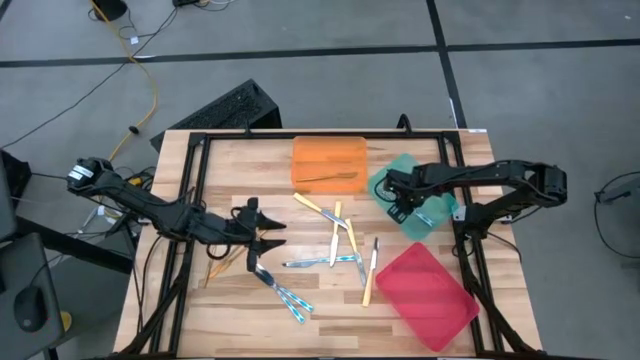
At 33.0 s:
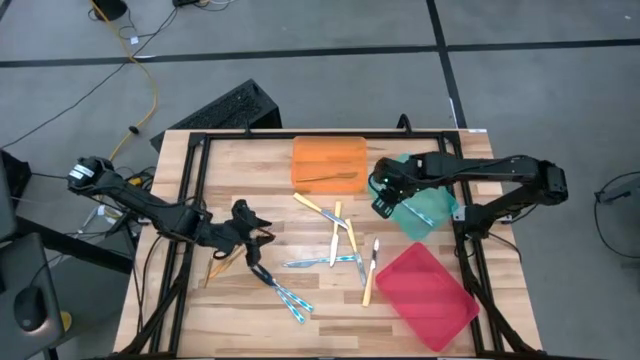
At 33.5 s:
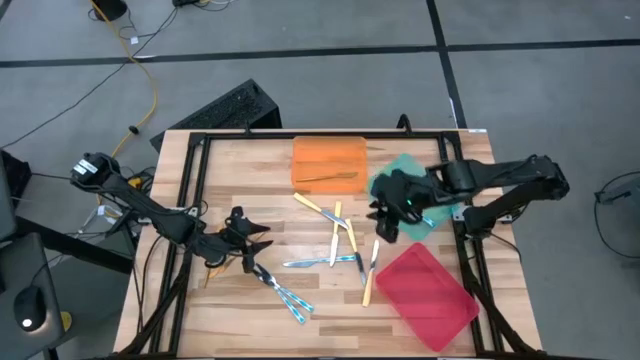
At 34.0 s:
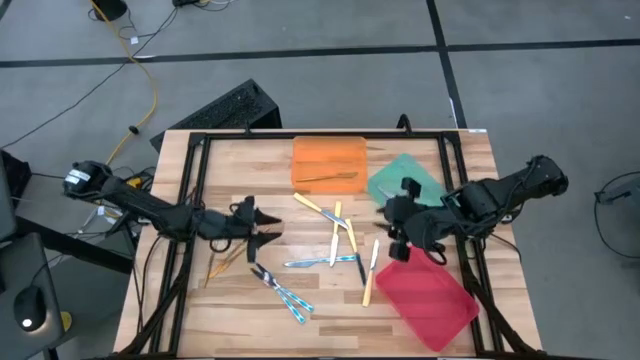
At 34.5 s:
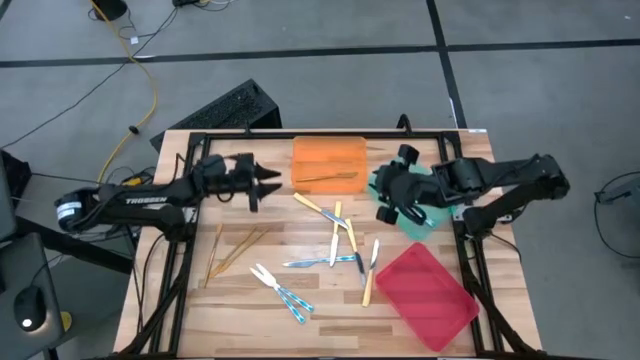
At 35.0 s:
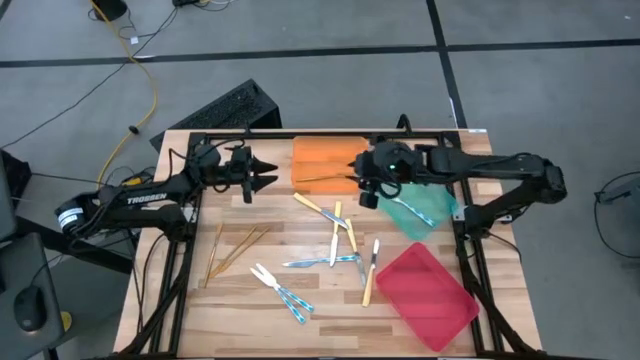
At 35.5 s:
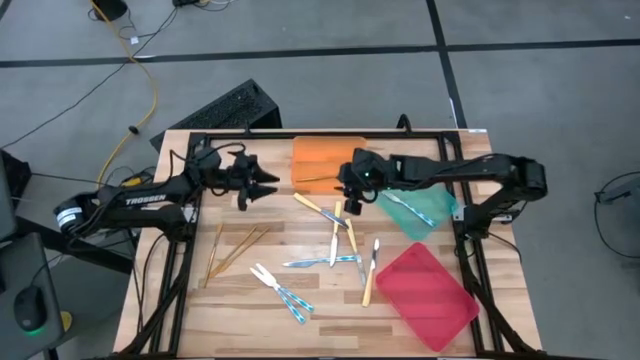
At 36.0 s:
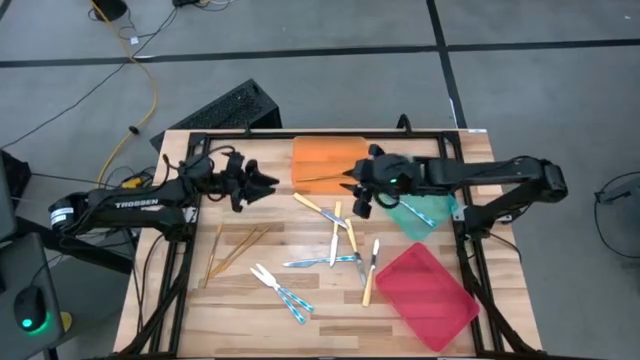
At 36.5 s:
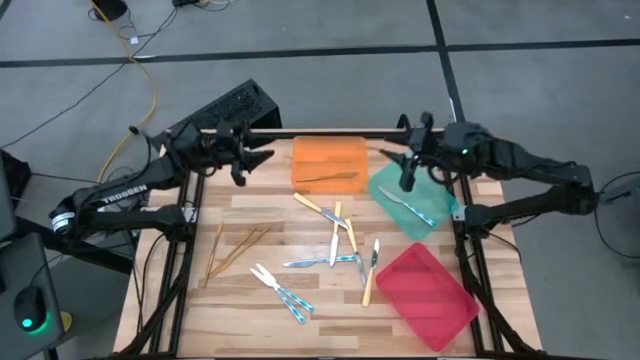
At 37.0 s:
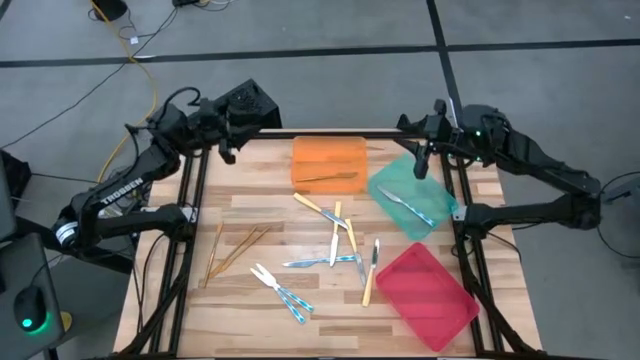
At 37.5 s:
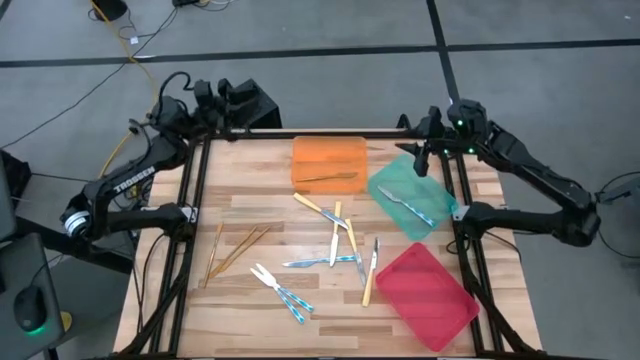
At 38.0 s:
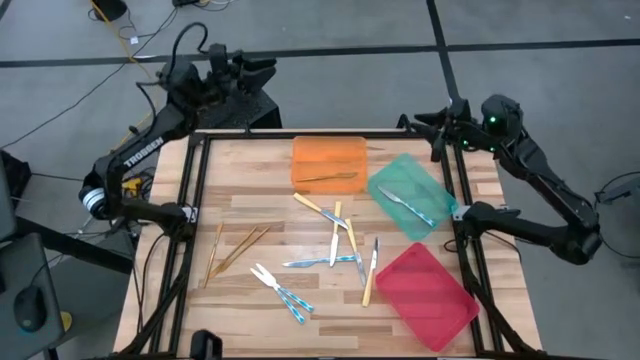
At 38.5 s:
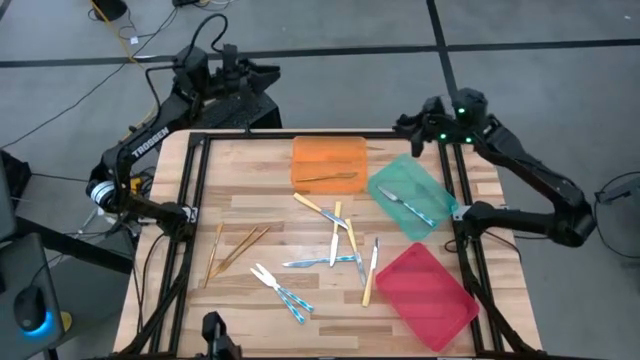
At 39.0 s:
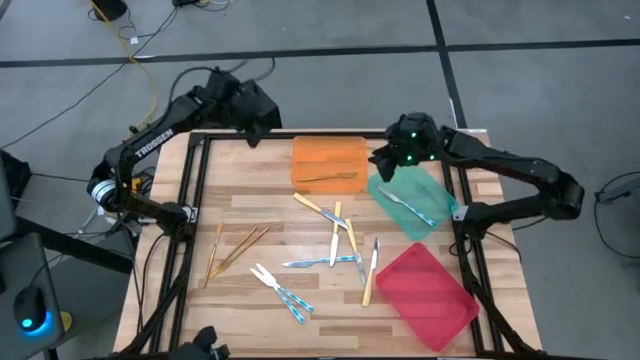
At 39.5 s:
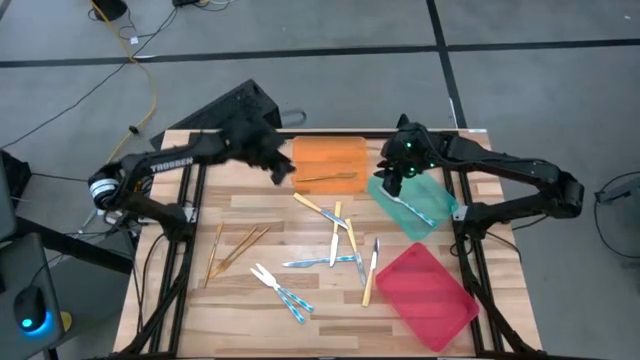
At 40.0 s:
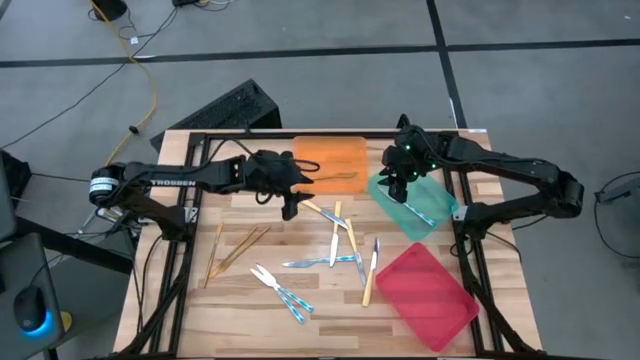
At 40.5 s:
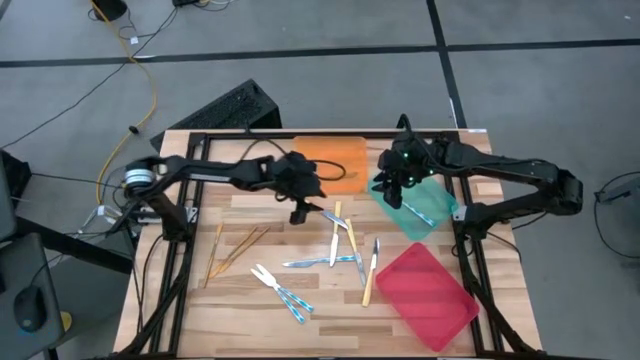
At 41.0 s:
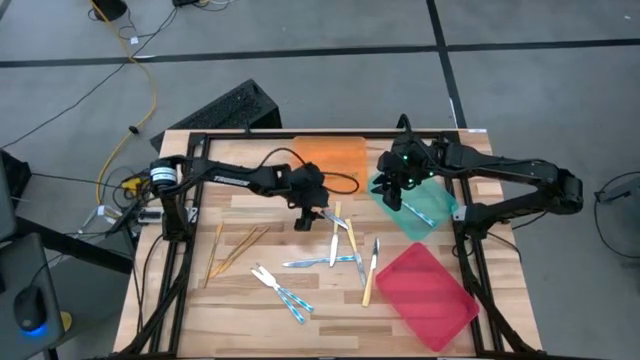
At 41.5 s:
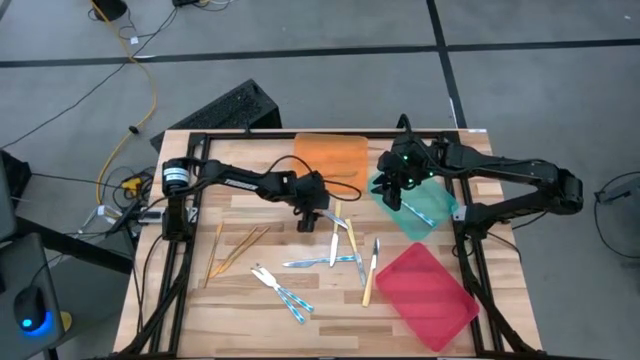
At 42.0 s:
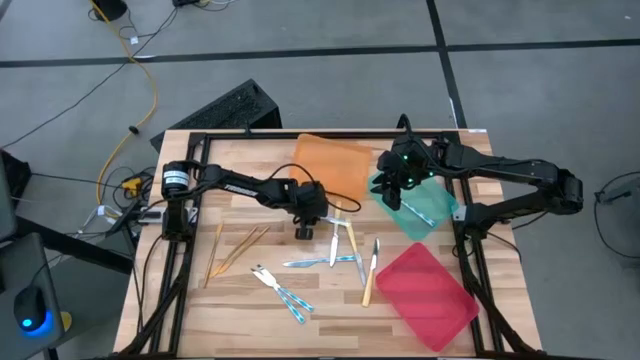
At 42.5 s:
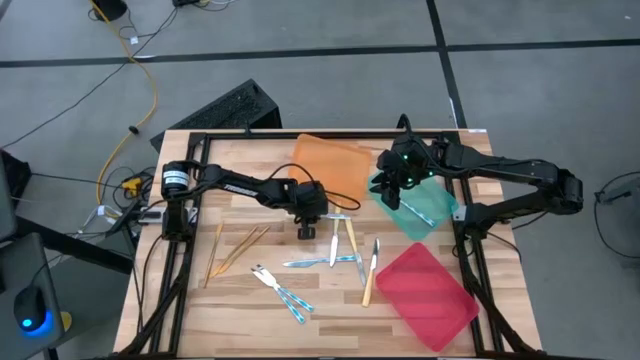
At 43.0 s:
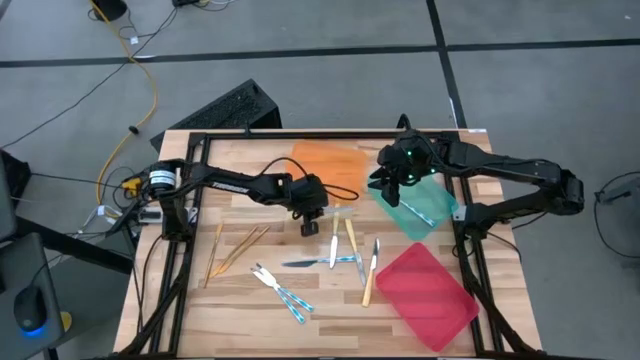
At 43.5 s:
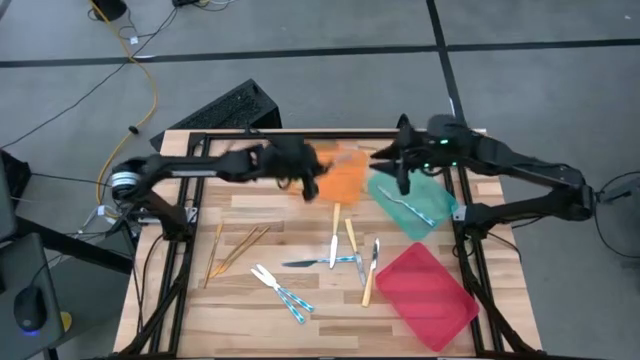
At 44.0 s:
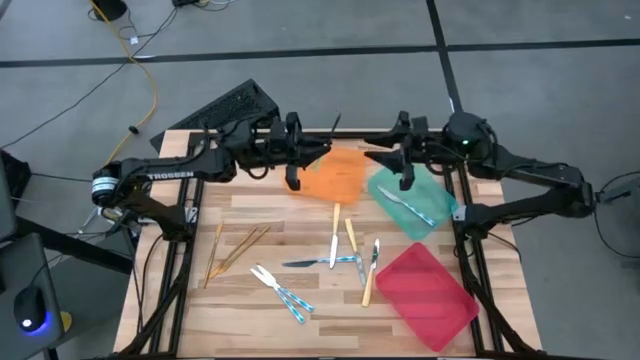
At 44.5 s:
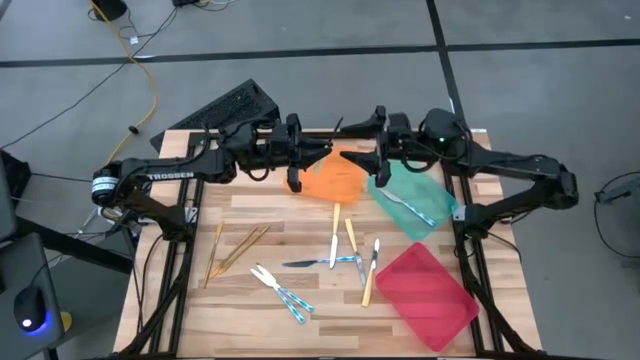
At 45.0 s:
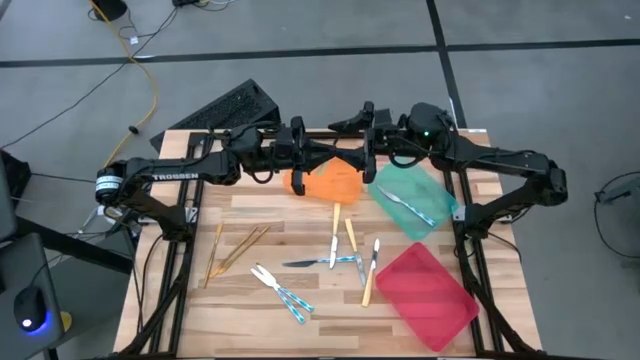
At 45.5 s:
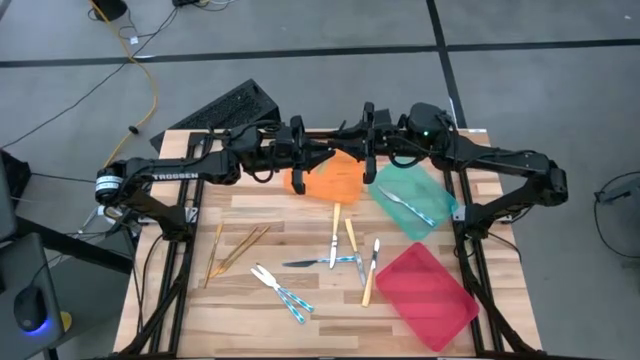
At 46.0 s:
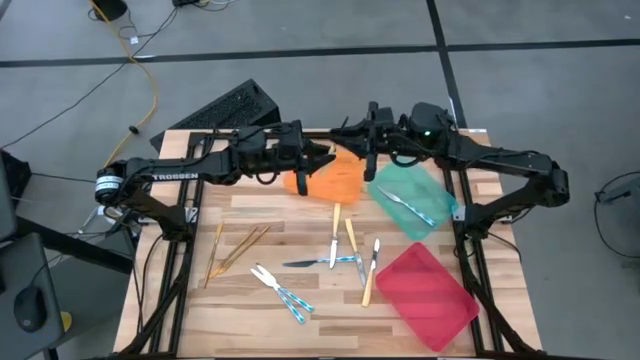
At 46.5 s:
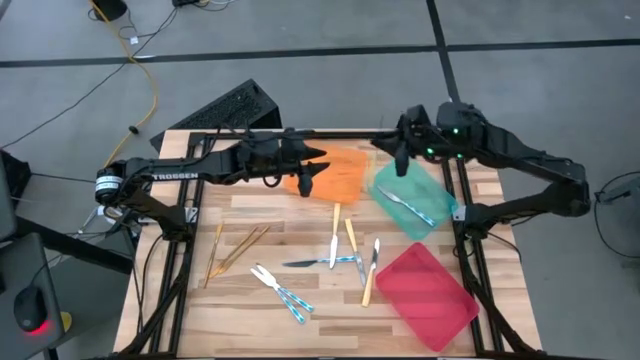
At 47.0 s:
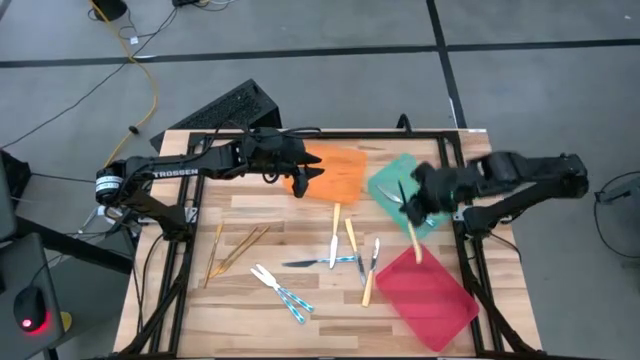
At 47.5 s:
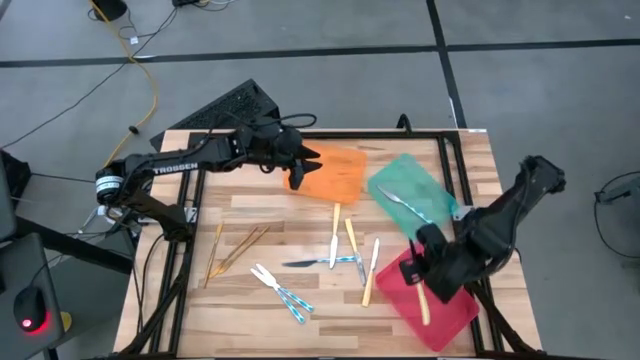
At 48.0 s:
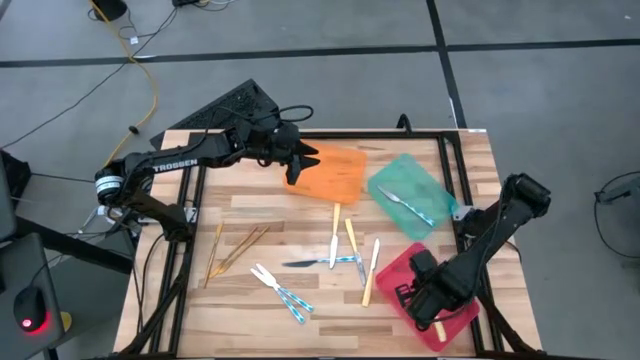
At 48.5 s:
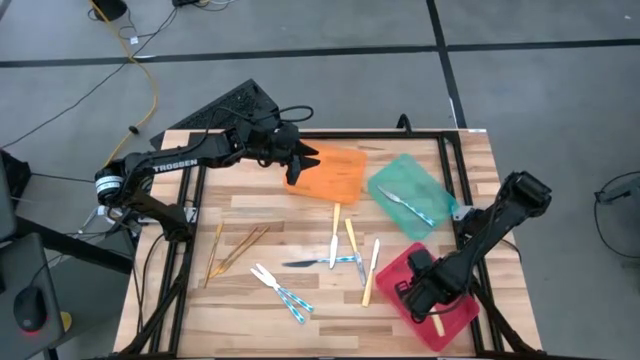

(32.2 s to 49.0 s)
Task: Sort silverware by color (type)
Put the yellow knife into the red bin
